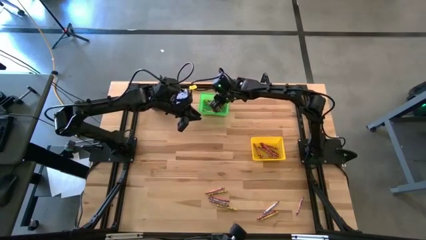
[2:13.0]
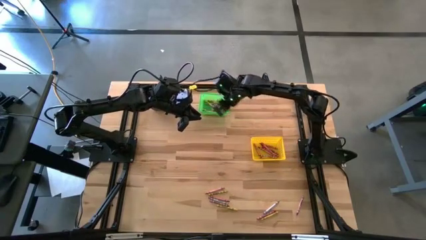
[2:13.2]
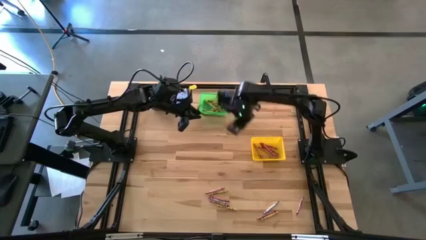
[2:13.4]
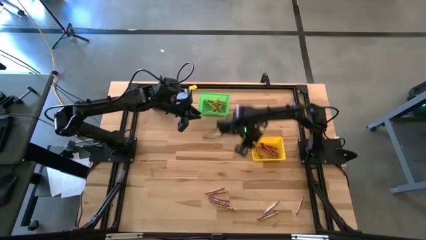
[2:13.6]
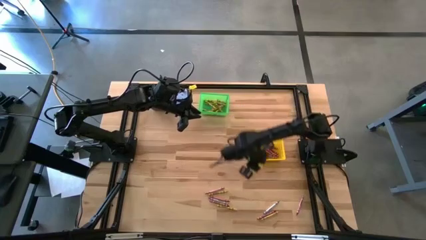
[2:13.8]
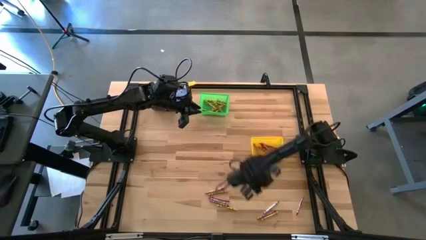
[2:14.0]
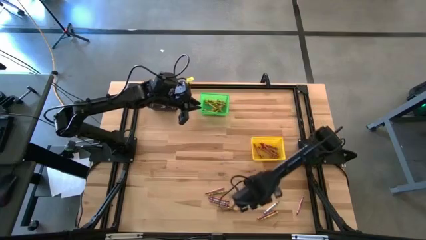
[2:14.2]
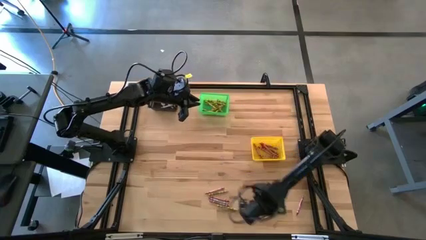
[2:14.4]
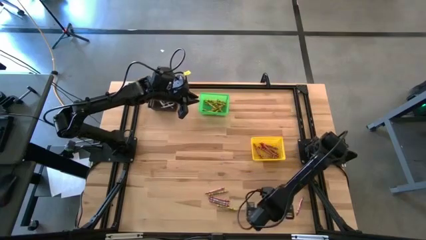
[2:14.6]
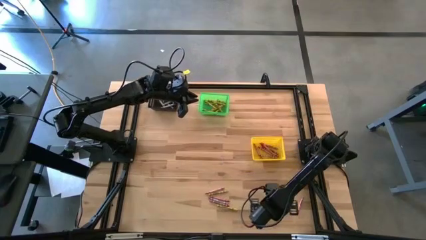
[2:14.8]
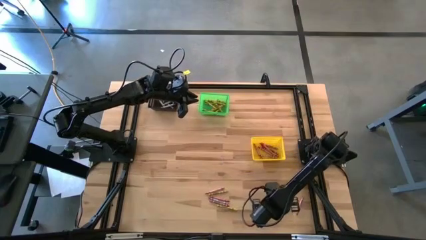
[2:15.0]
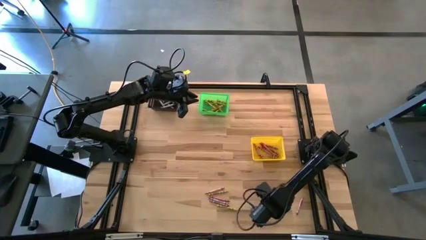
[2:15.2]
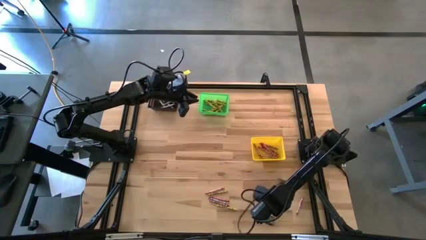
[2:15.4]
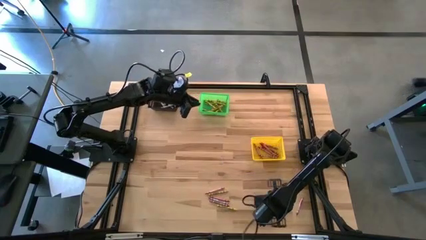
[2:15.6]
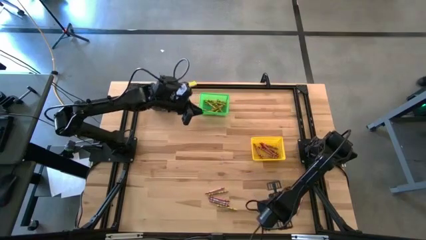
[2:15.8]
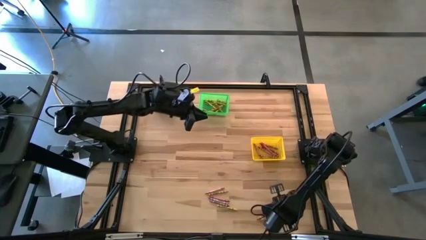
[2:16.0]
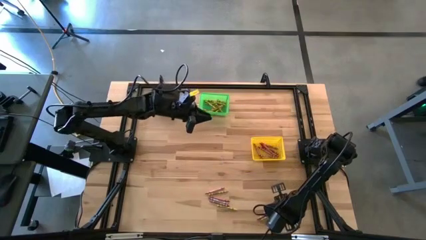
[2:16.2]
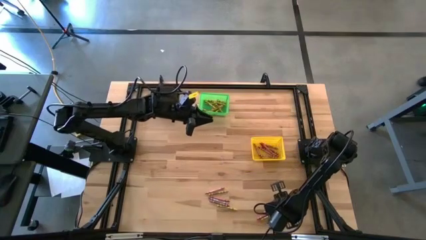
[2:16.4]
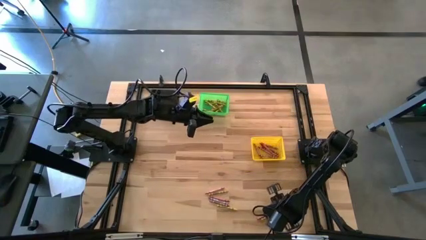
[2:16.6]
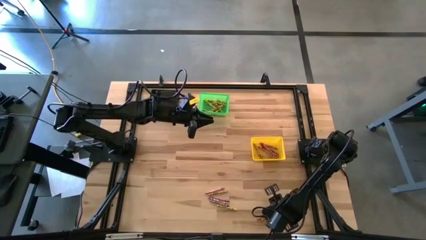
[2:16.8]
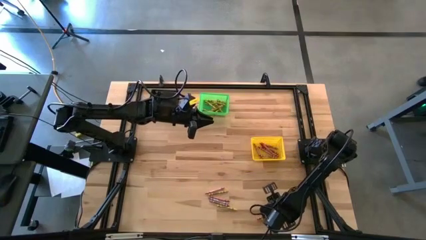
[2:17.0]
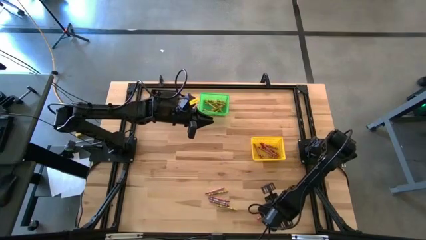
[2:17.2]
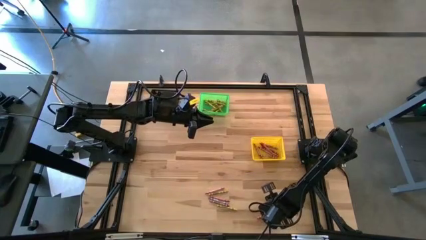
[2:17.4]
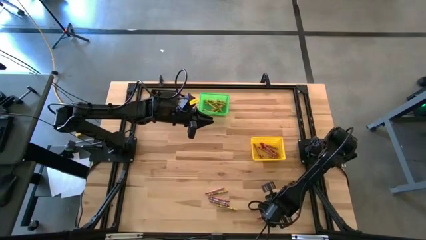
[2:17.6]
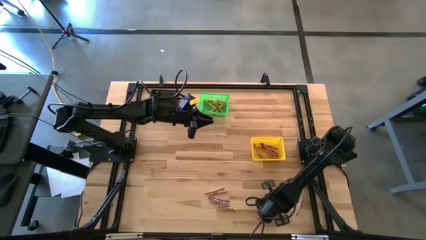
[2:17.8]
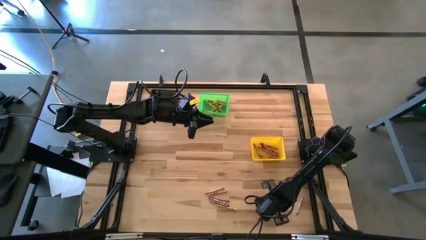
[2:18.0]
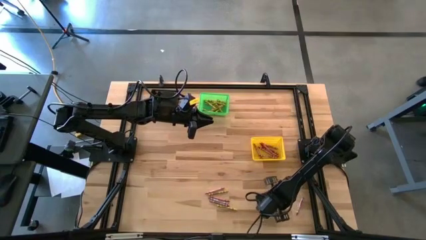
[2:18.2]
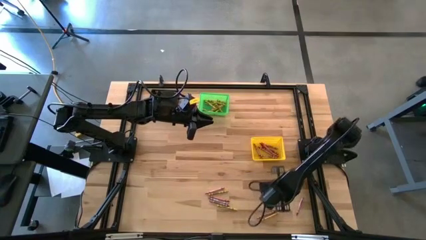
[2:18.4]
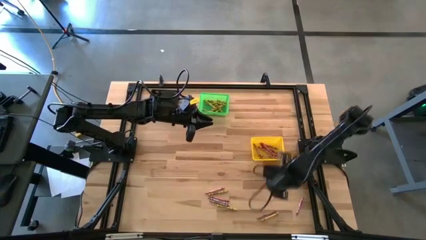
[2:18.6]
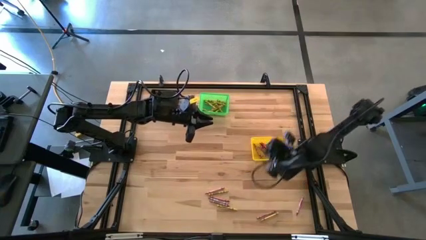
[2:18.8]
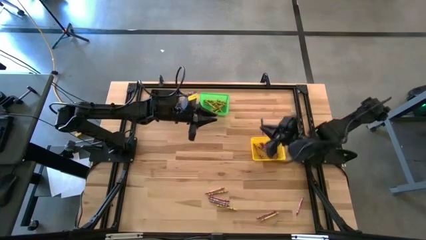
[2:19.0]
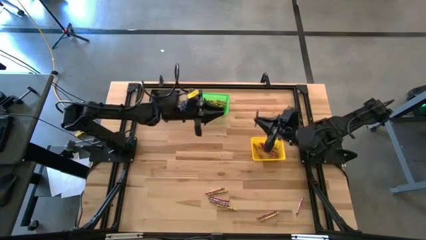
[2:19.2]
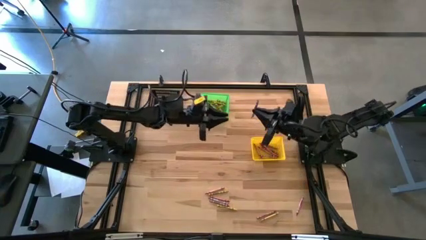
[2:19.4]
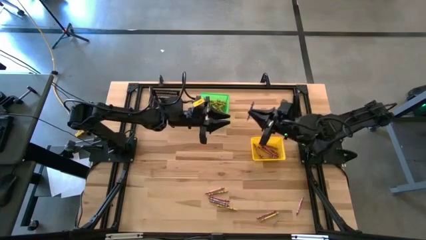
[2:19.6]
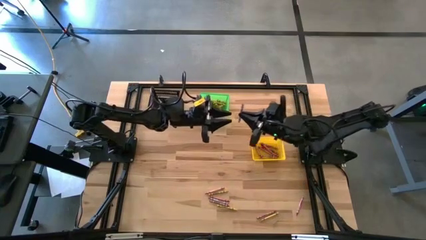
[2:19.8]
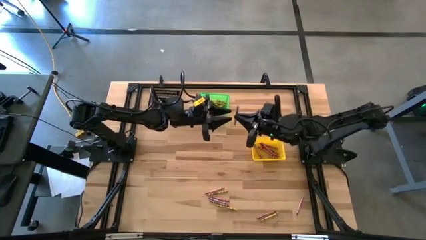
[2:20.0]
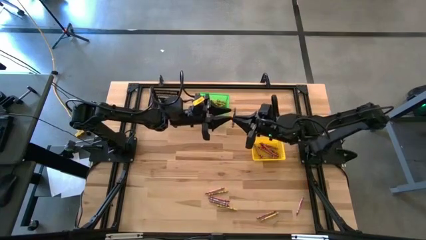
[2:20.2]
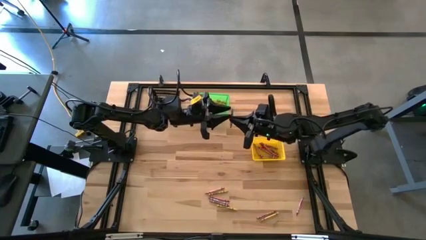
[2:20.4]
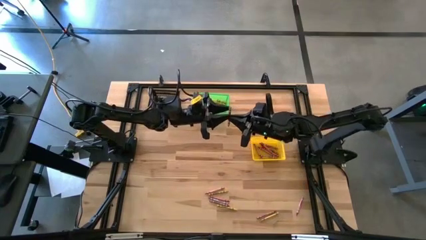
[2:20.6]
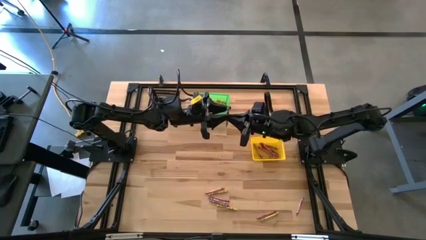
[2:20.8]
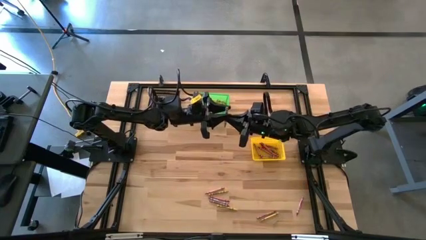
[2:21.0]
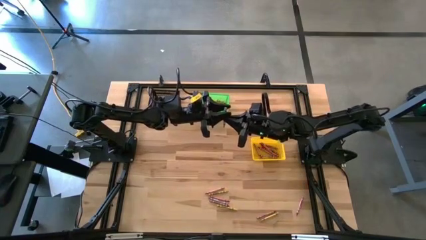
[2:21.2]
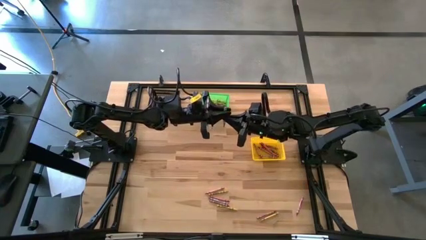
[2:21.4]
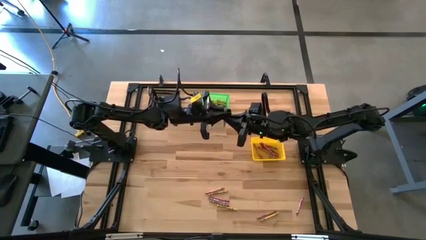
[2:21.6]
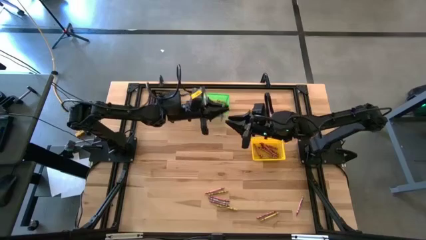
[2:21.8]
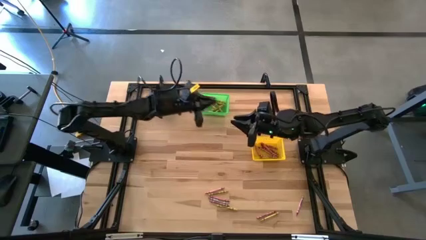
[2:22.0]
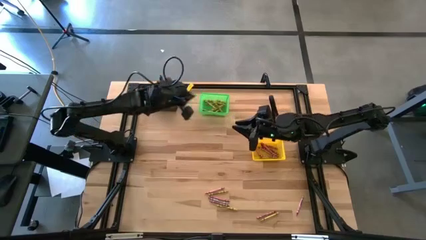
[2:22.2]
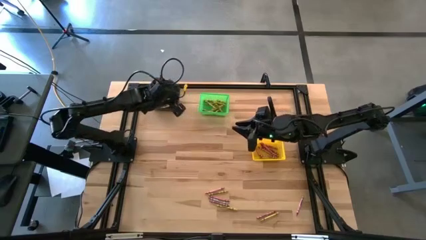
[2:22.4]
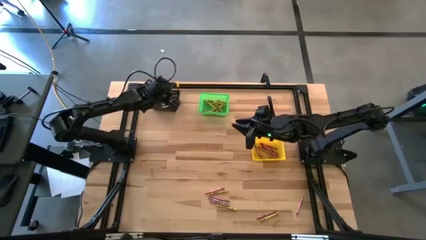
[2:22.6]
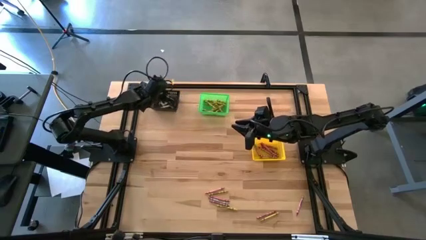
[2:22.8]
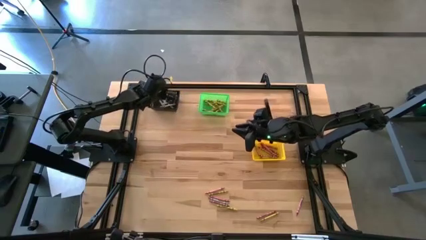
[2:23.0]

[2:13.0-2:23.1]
Task: Sort crayons
Put the gray crayon into the black basket

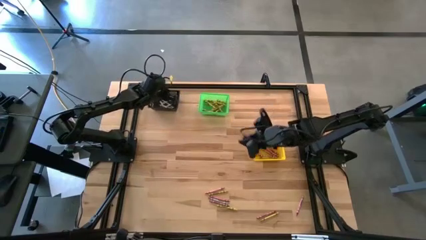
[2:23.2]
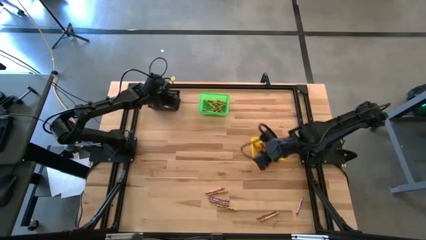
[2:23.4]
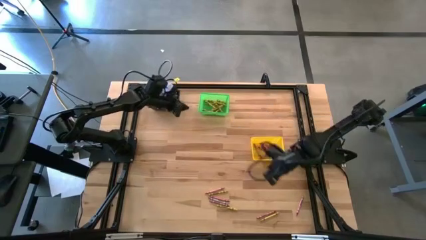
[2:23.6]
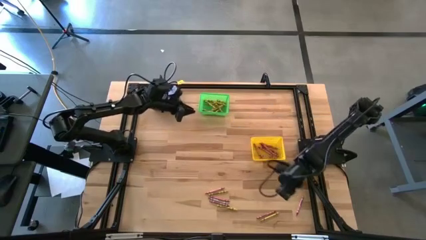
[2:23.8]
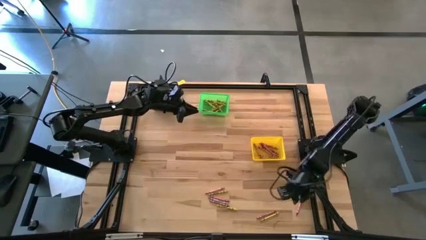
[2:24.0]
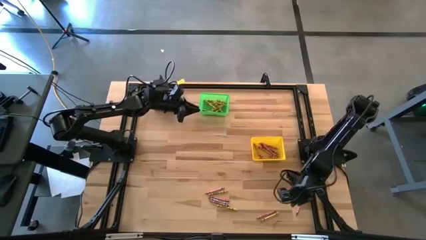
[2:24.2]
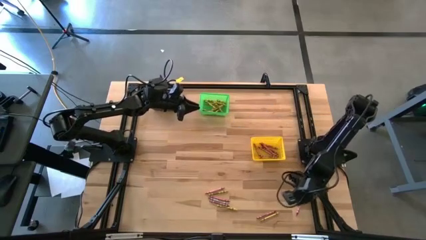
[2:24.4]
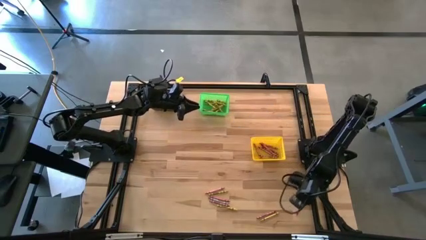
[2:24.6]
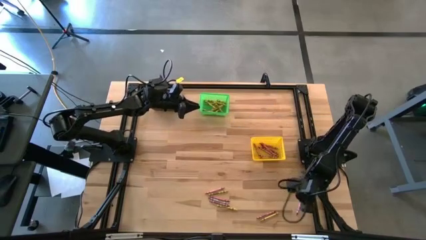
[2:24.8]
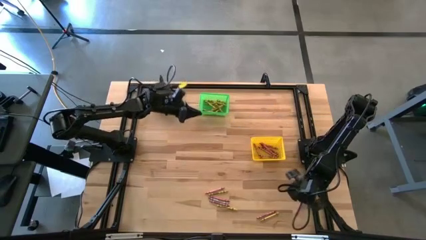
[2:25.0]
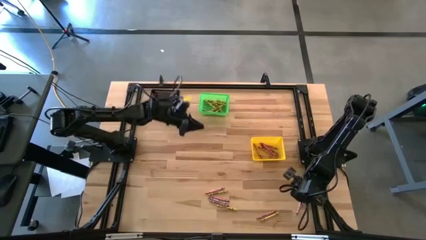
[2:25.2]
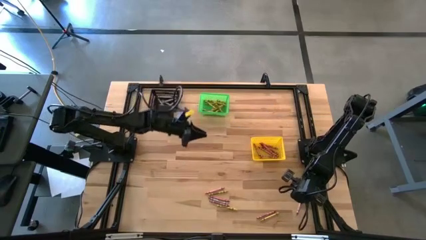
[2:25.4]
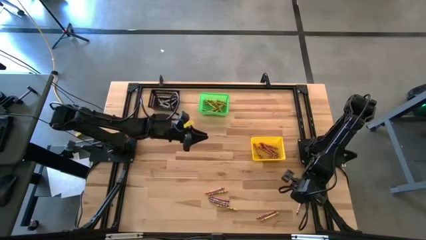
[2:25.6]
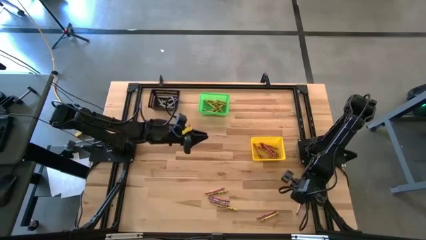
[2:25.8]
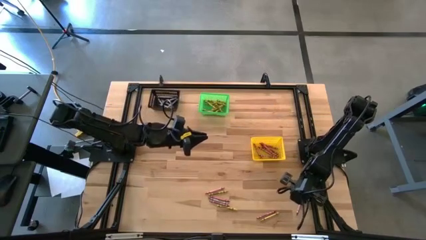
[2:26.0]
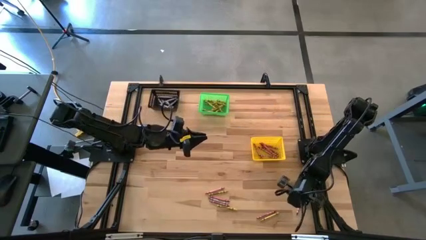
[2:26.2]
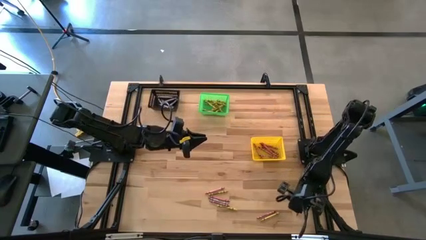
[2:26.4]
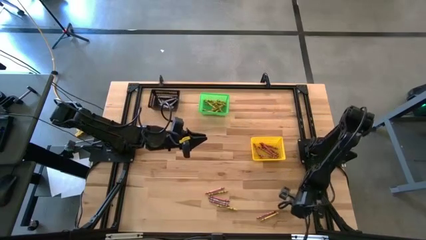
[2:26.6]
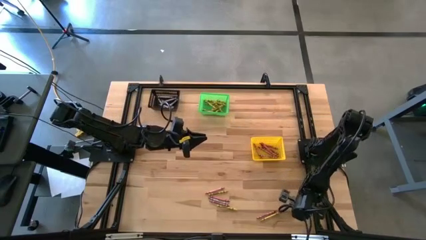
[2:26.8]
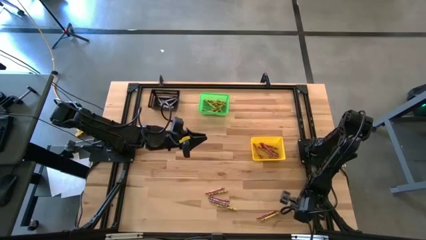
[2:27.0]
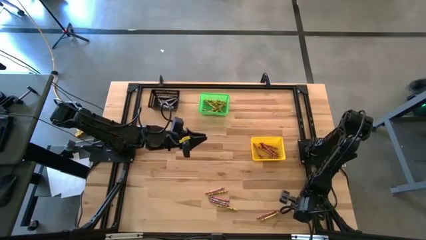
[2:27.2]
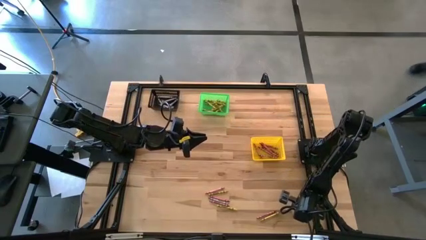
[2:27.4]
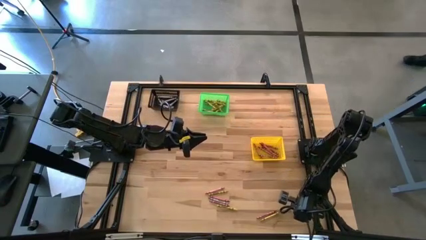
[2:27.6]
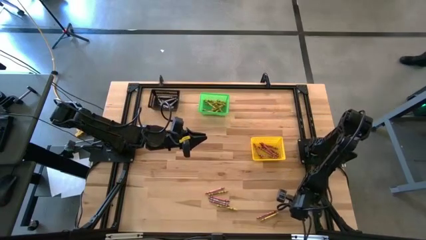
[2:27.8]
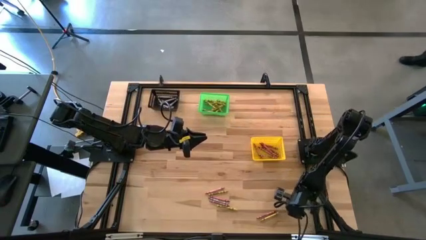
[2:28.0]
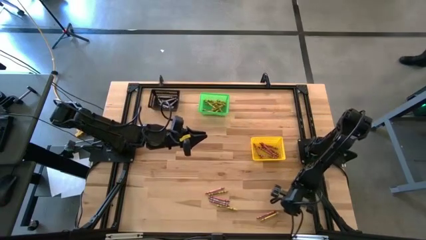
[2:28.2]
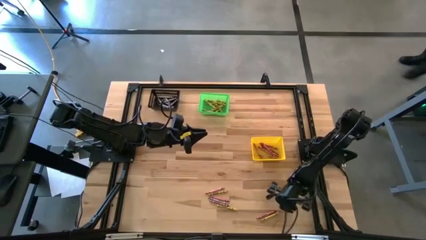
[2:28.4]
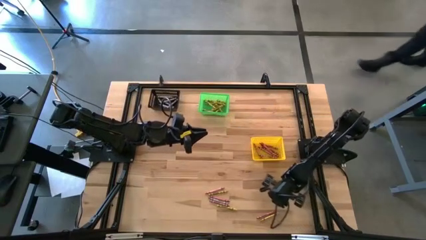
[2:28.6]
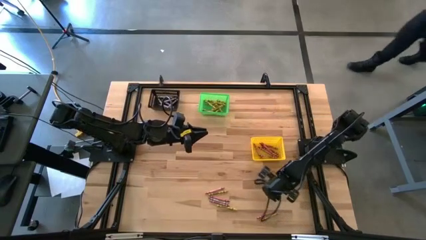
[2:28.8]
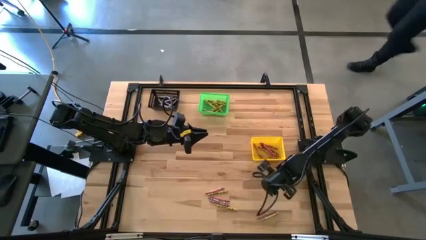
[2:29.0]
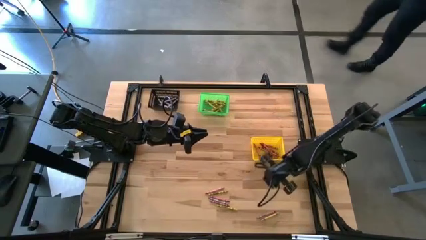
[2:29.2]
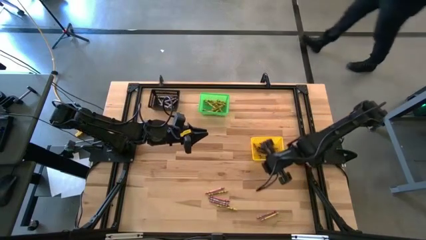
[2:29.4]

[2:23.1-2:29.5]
Put the red crayon into the yellow basket

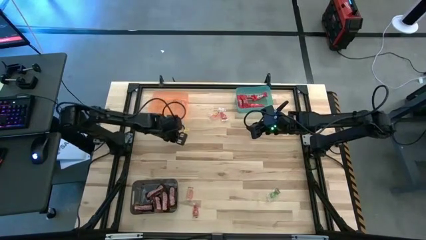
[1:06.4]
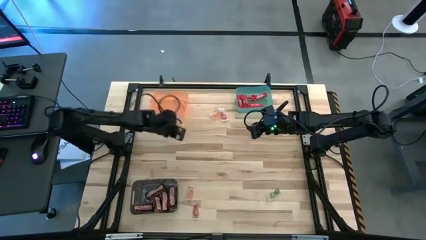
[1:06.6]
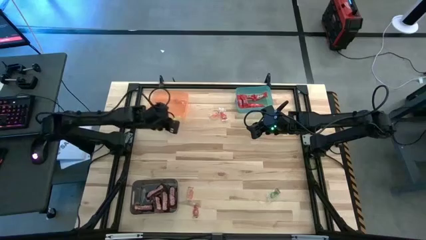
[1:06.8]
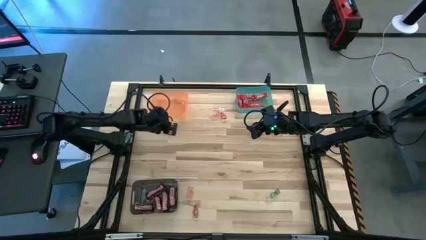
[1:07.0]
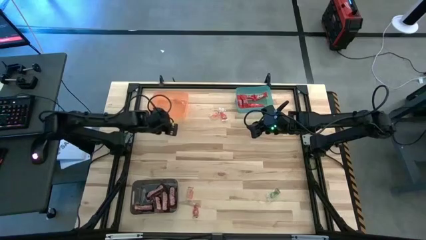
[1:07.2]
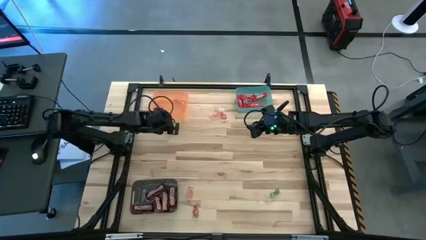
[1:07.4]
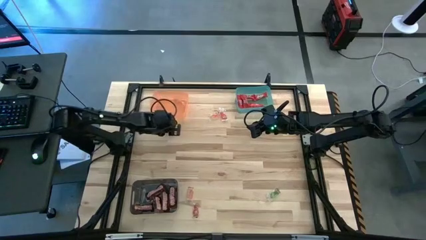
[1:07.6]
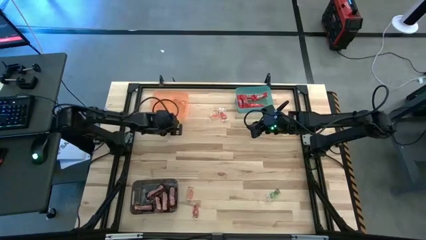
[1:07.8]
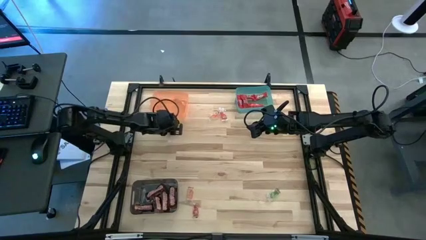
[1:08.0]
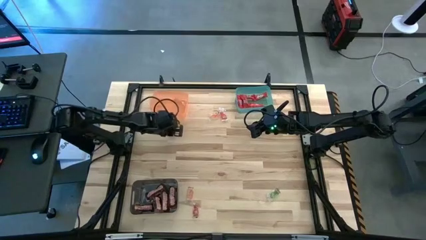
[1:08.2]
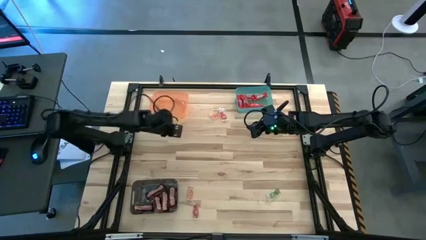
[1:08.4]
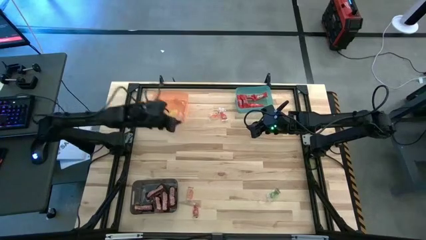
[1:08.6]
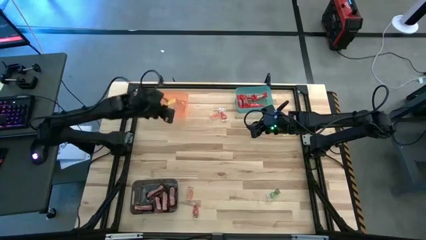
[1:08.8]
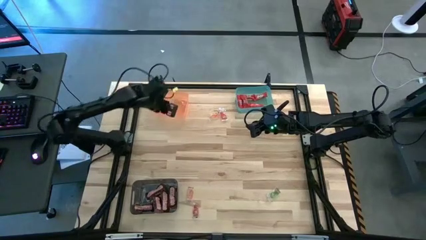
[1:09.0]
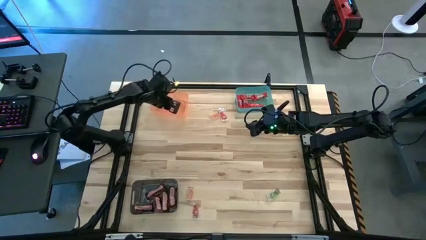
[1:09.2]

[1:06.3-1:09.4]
Task: Sort candy by brand, put in halloween buckets
Put the orange gummy into the orange bin
